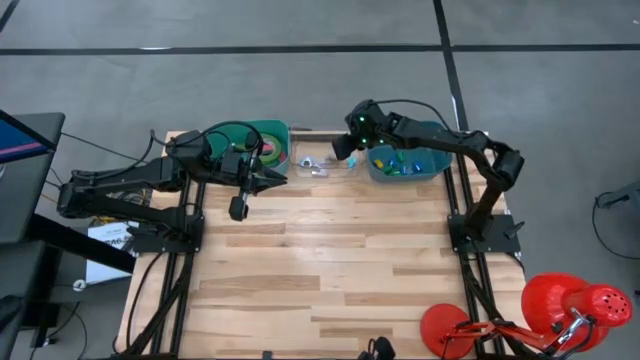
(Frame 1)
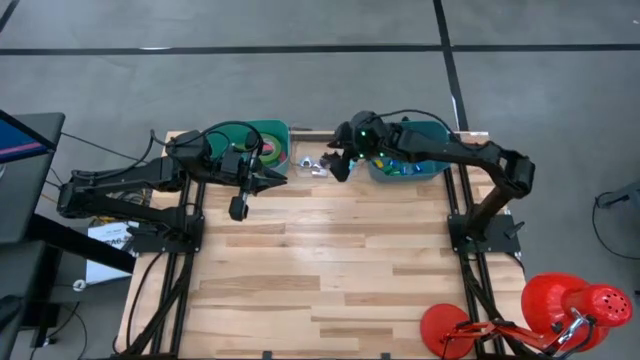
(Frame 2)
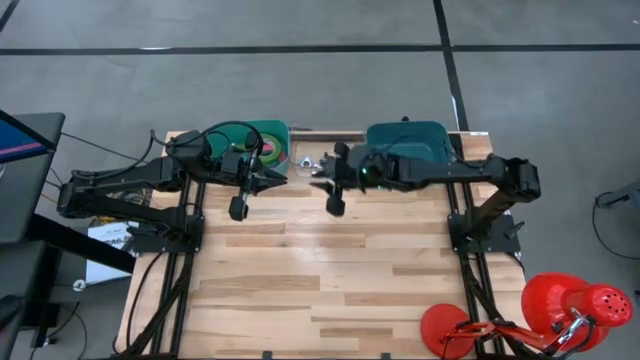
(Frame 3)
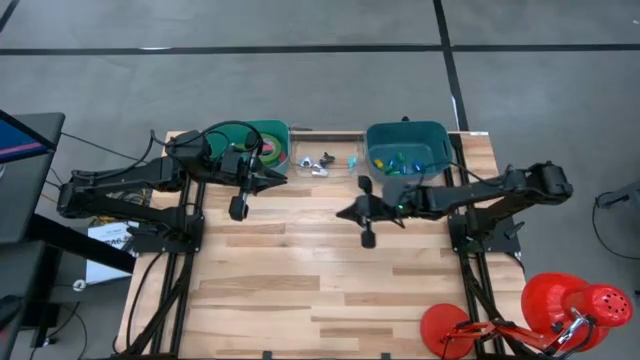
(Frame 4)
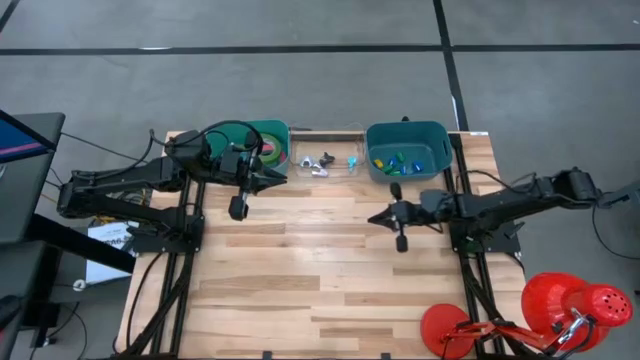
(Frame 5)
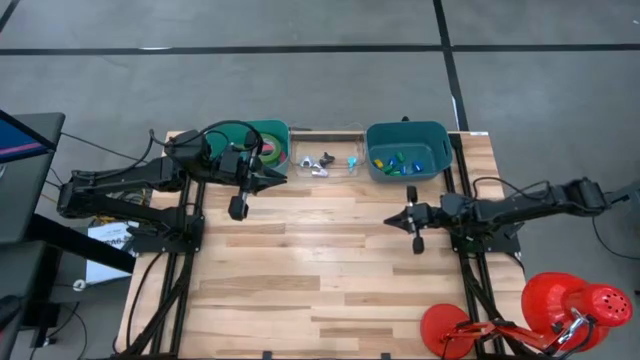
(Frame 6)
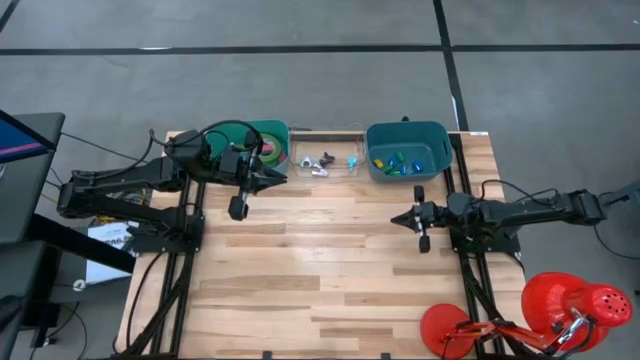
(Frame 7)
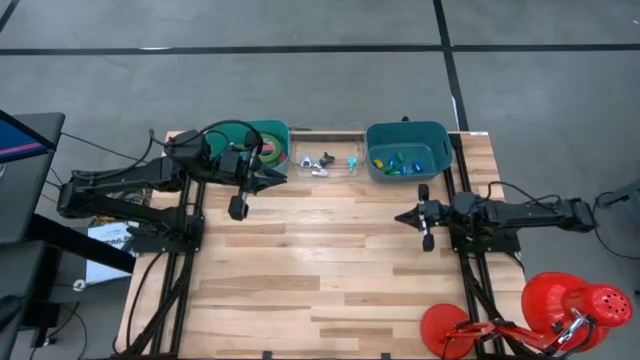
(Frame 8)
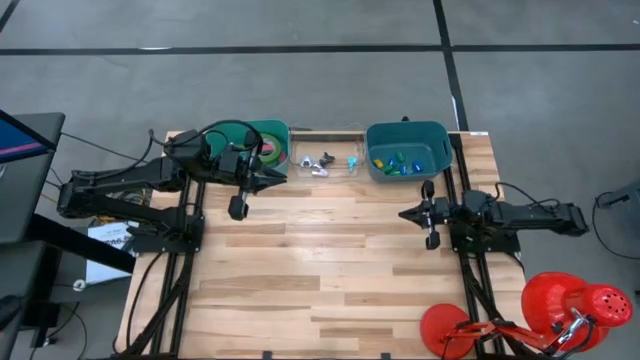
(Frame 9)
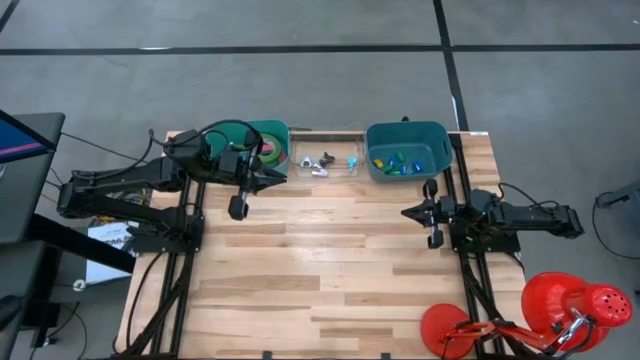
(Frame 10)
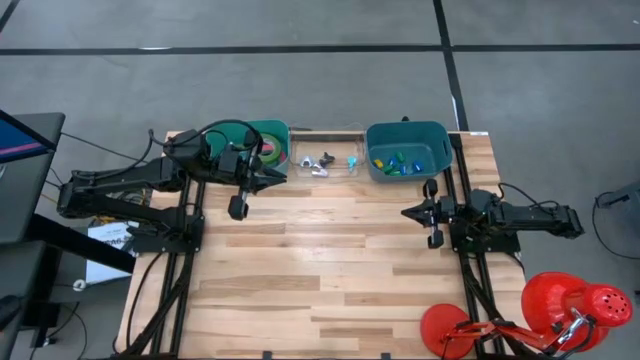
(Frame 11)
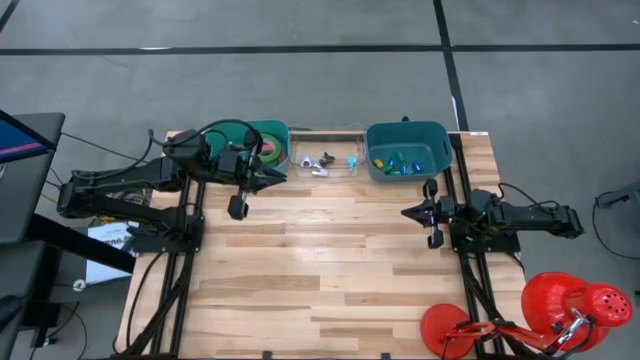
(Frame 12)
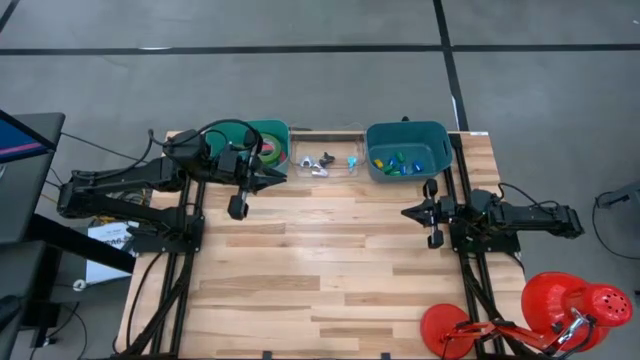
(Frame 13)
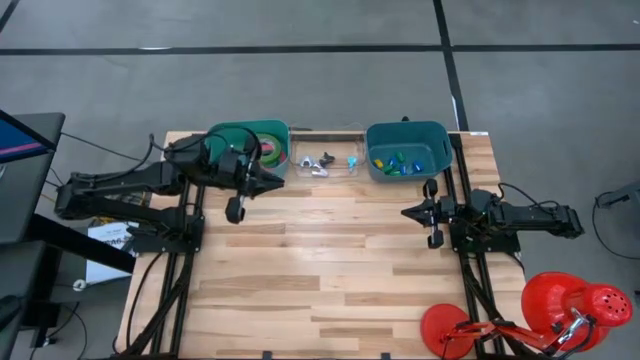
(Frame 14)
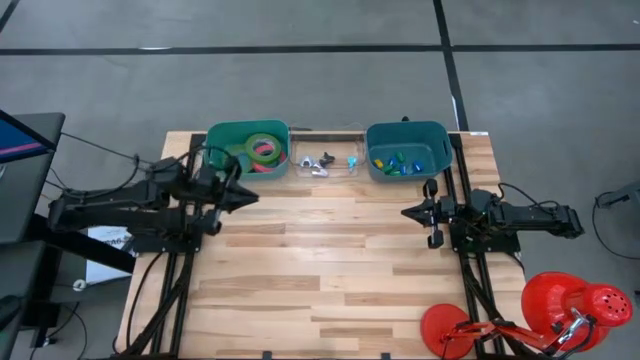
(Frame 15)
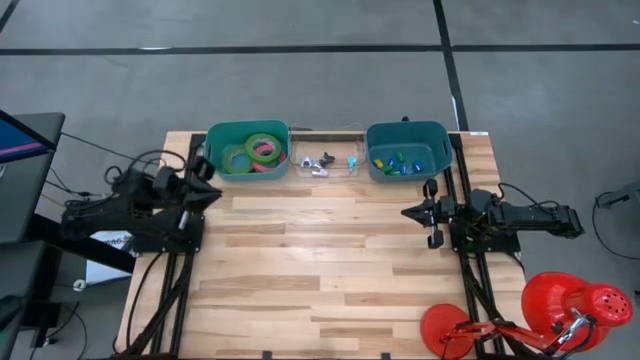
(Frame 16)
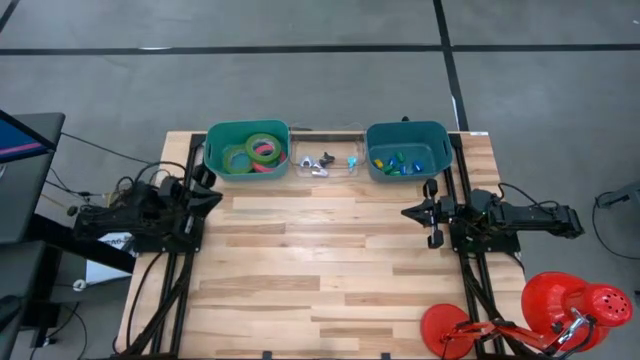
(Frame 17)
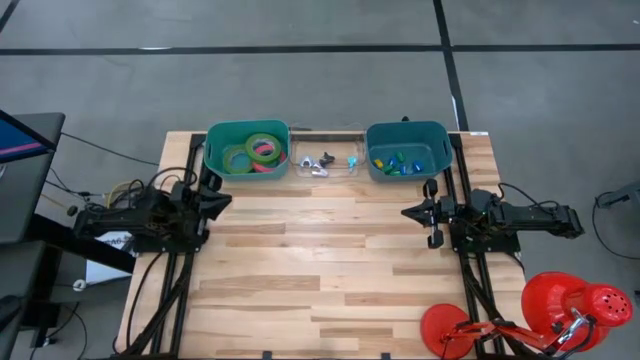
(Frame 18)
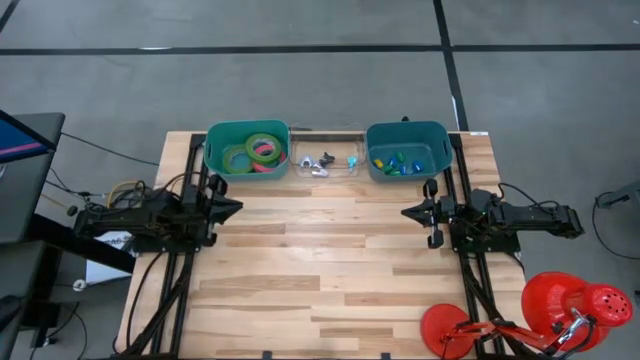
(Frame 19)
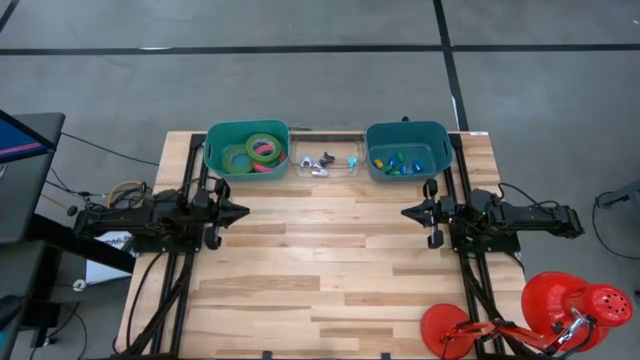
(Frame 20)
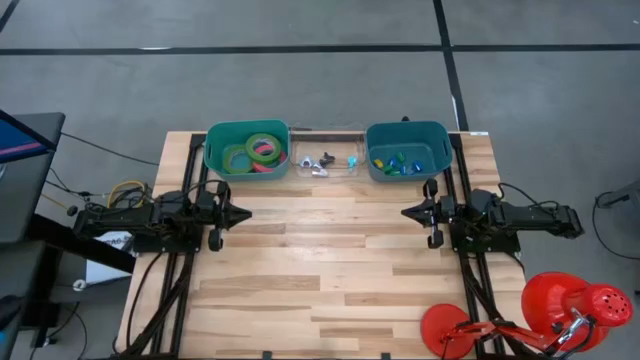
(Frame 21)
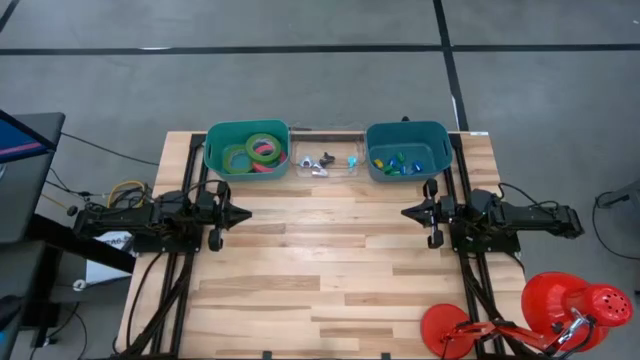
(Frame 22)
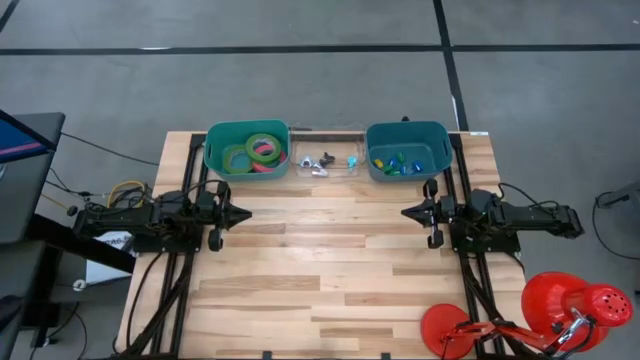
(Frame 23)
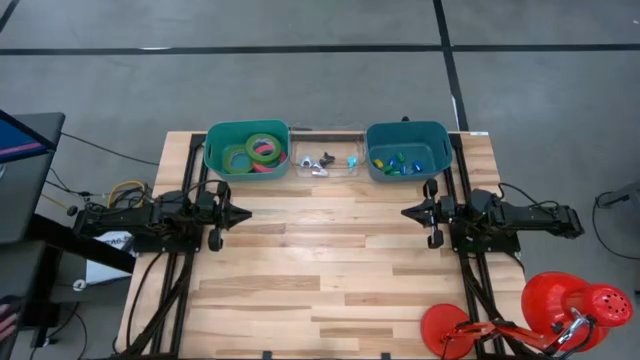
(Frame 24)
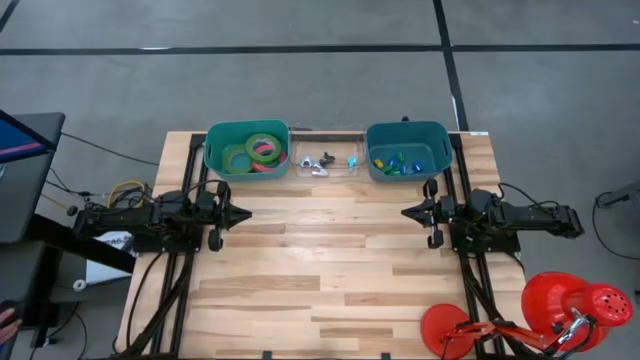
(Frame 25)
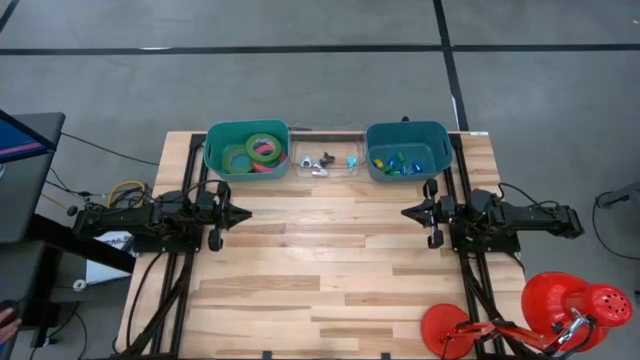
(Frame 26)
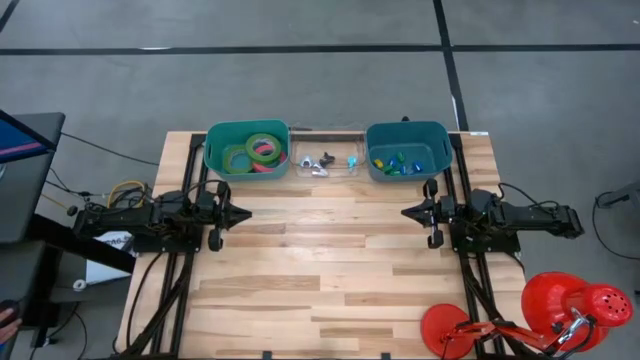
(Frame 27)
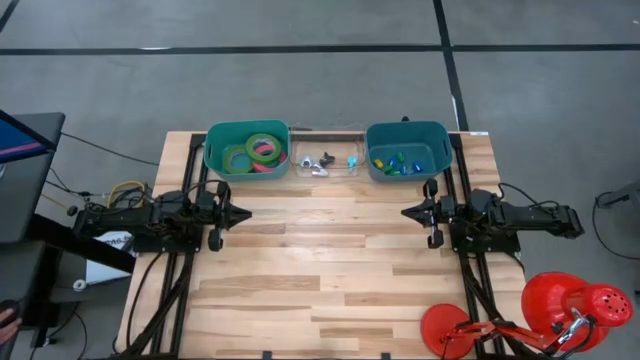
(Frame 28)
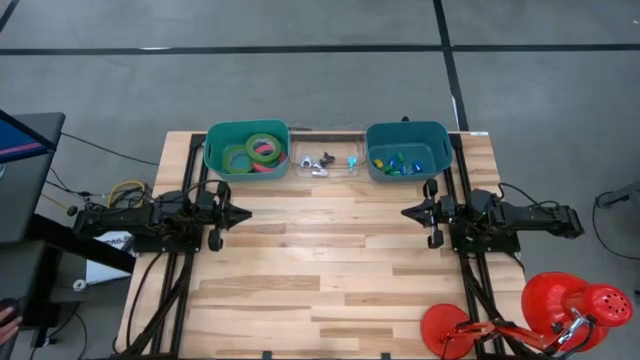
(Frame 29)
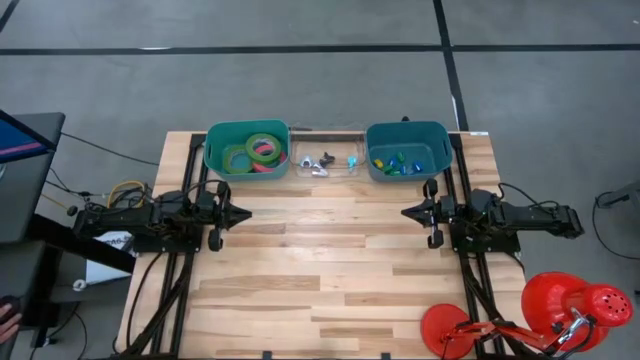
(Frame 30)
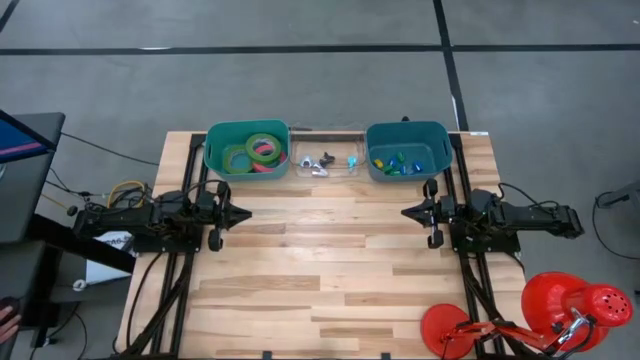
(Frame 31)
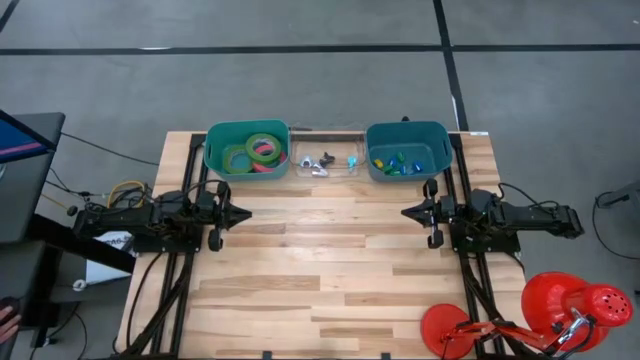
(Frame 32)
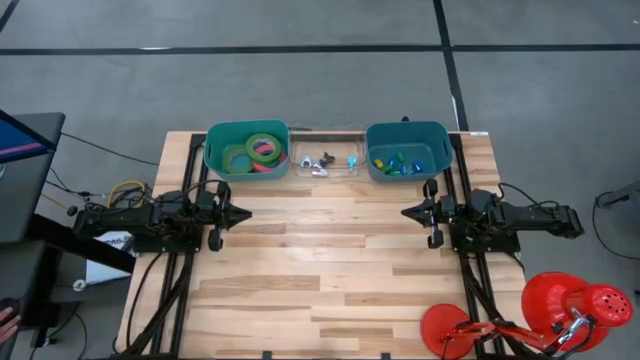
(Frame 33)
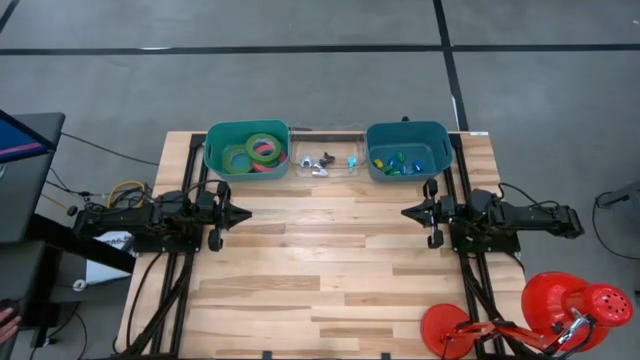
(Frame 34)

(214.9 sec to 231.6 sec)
Task: Pick and place Stapler, Stapler remover, tape
Return to Home Position

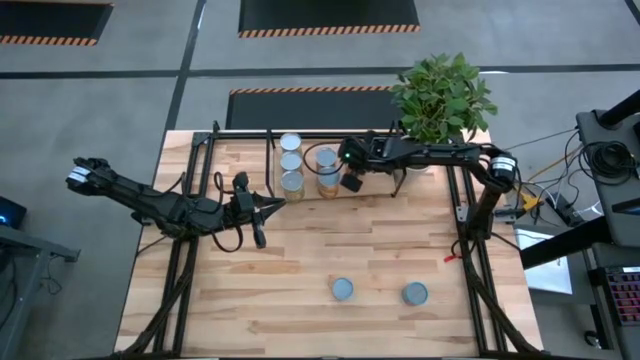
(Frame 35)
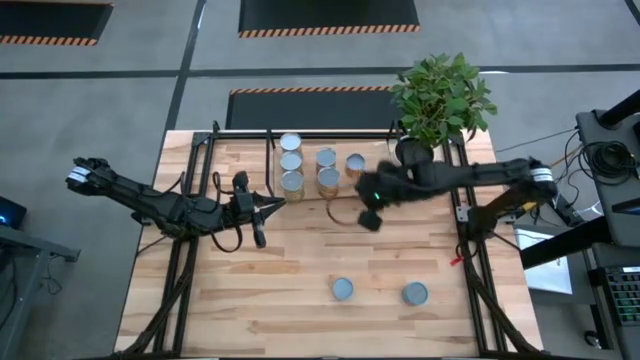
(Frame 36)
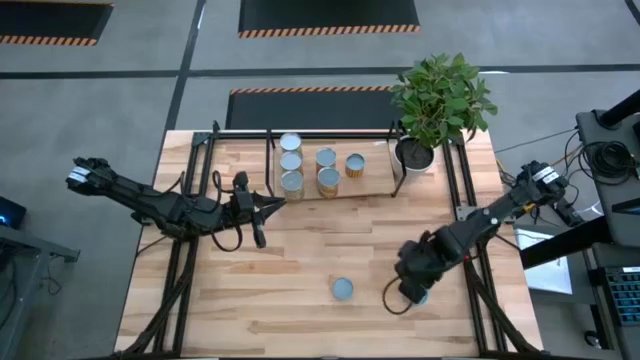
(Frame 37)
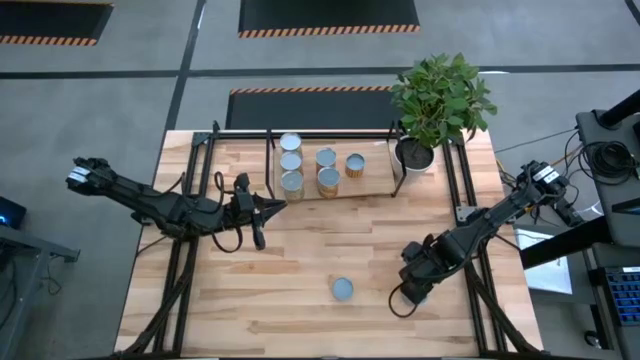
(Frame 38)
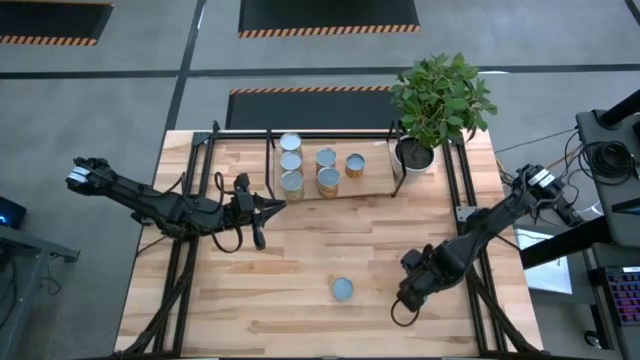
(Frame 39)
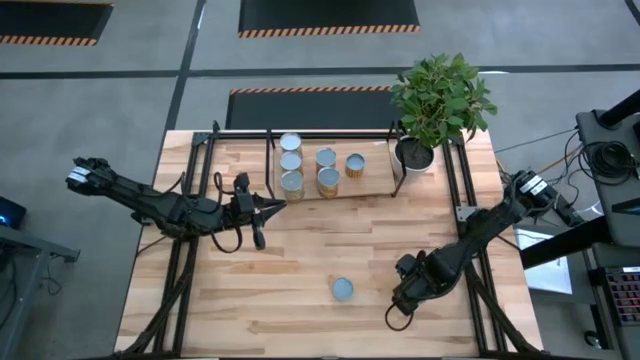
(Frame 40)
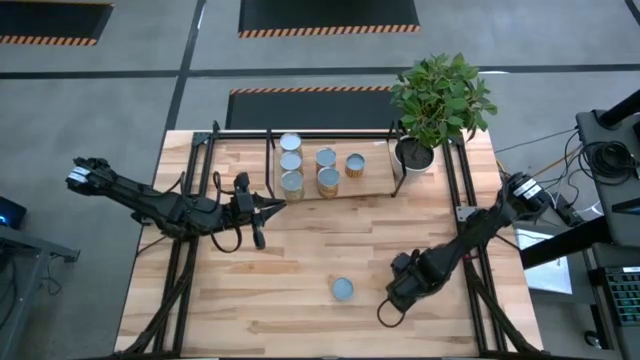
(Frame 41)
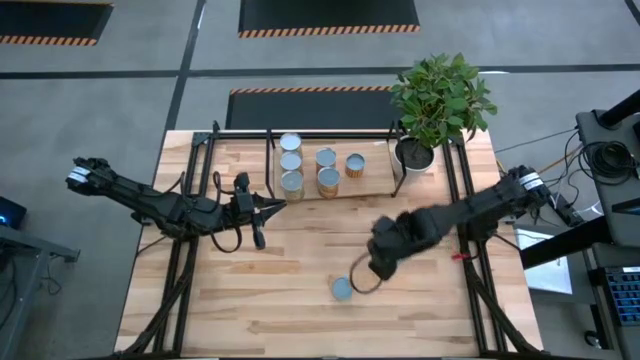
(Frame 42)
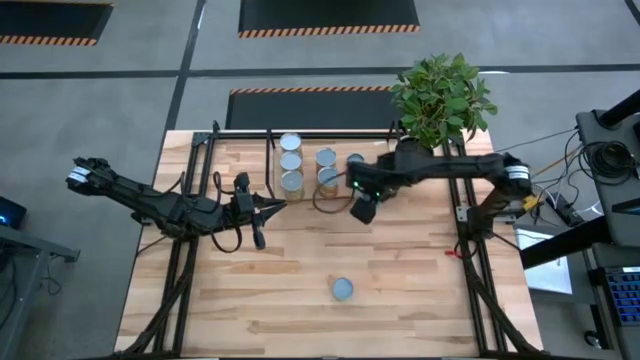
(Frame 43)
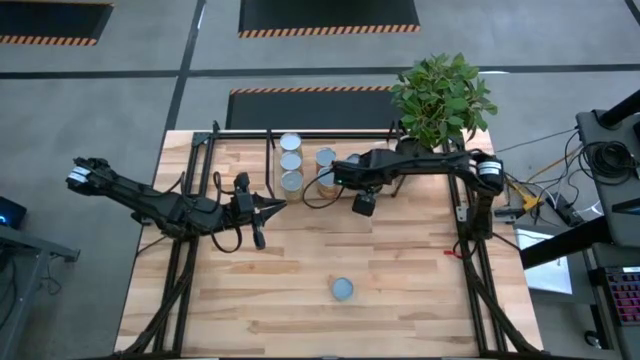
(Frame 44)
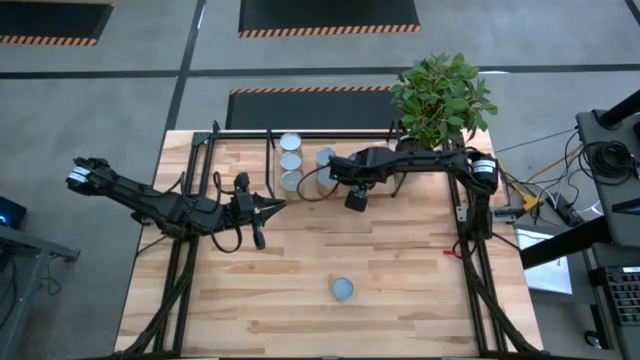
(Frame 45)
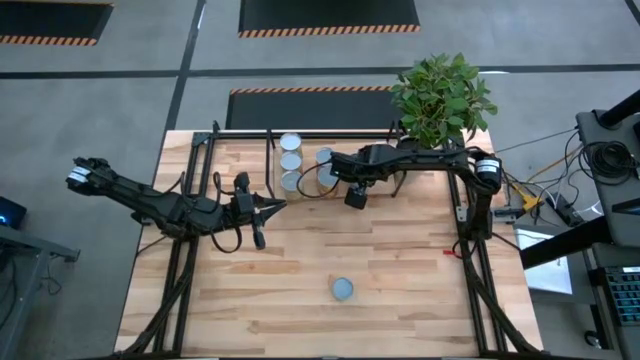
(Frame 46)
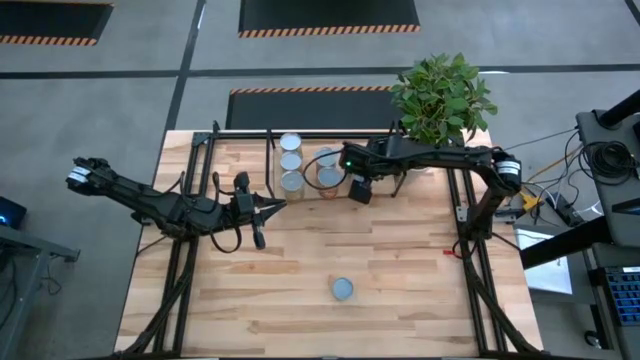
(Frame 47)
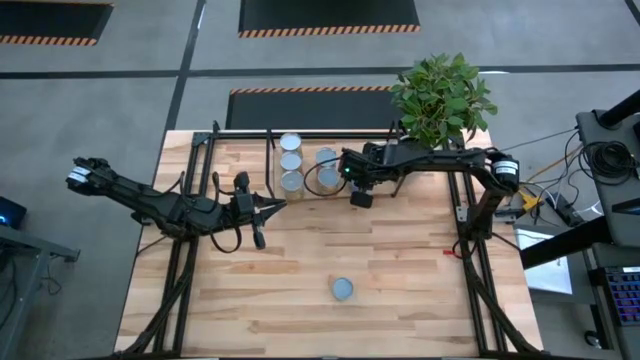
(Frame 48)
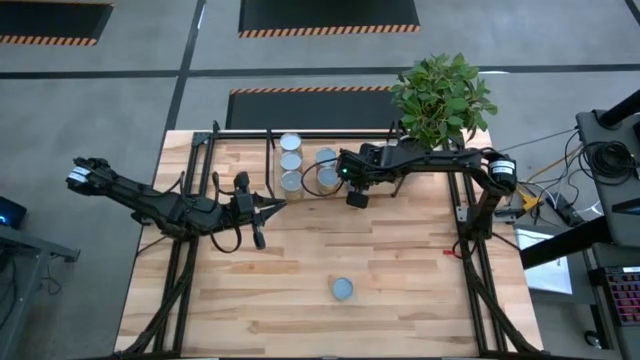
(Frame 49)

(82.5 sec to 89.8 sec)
Task: Pick and place cans onto a shelf
Put the canned mixed fruits on the shelf
